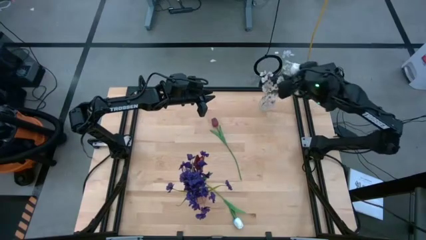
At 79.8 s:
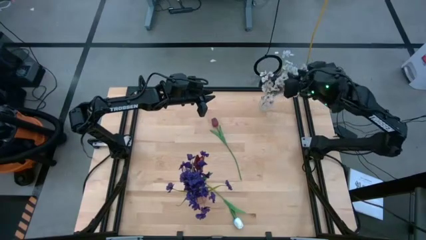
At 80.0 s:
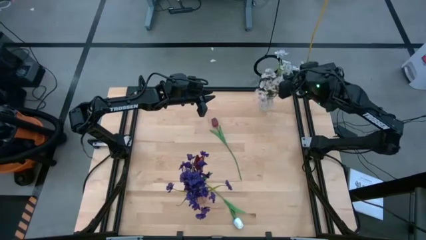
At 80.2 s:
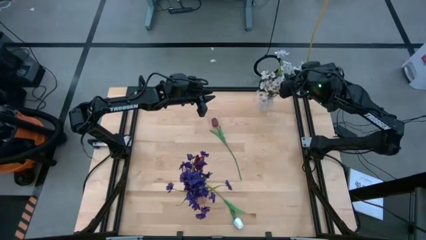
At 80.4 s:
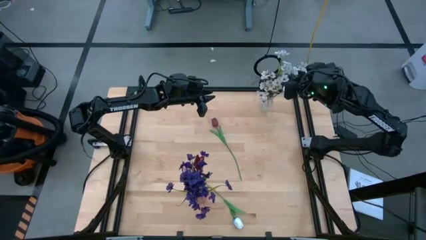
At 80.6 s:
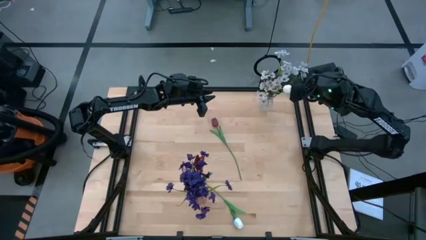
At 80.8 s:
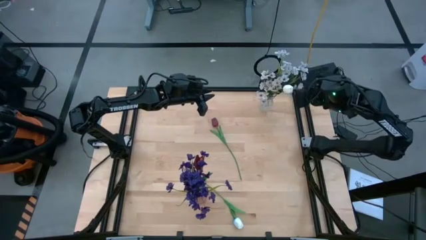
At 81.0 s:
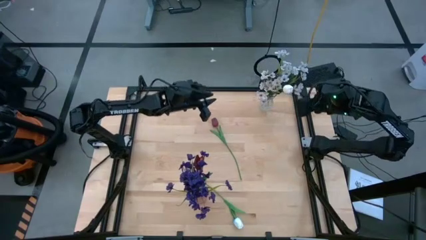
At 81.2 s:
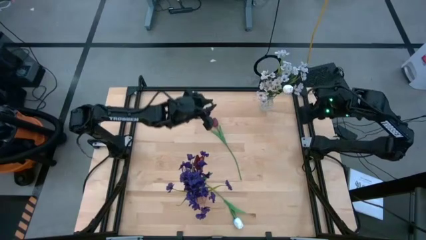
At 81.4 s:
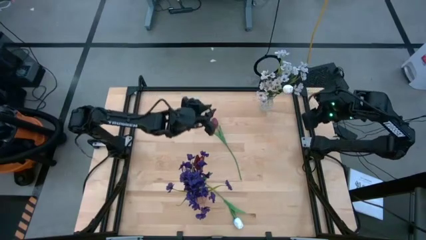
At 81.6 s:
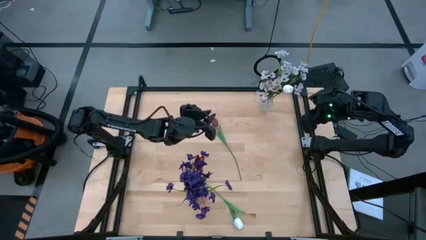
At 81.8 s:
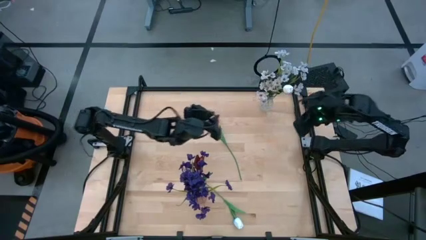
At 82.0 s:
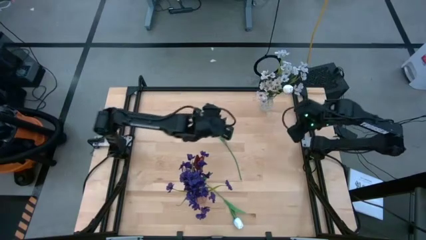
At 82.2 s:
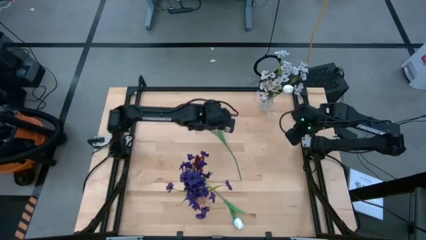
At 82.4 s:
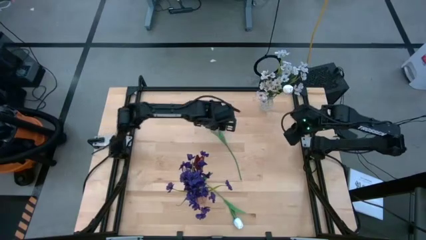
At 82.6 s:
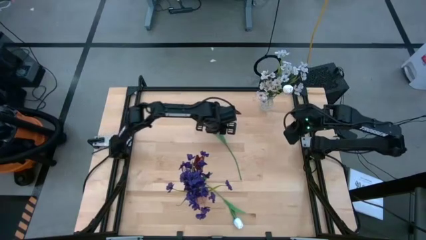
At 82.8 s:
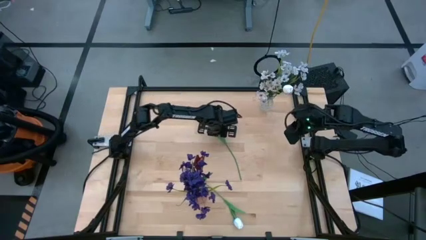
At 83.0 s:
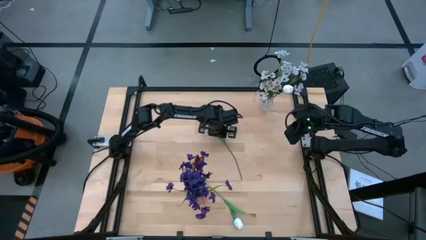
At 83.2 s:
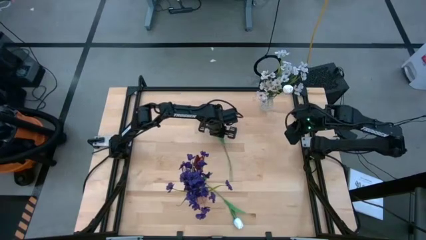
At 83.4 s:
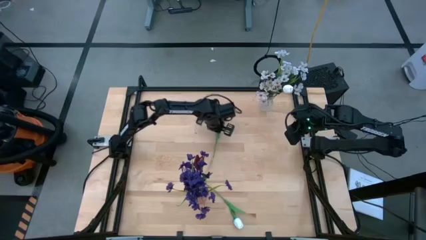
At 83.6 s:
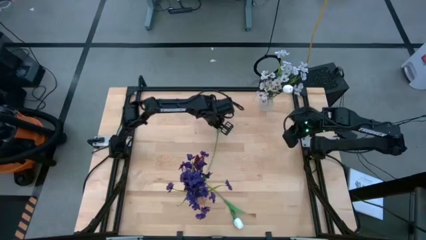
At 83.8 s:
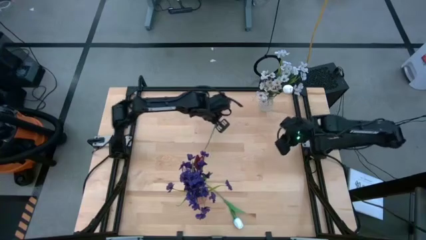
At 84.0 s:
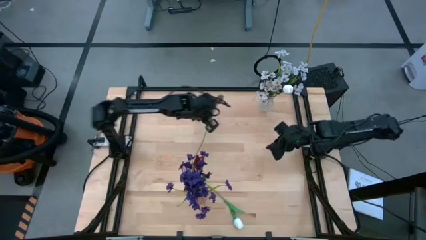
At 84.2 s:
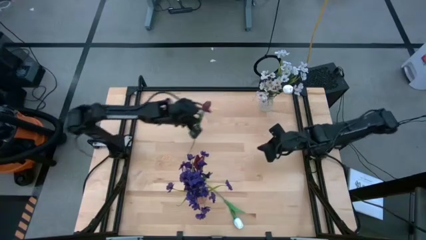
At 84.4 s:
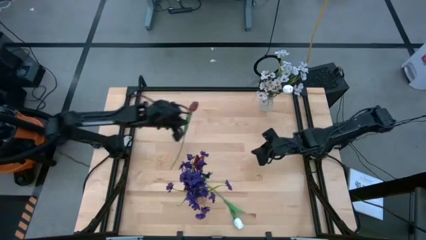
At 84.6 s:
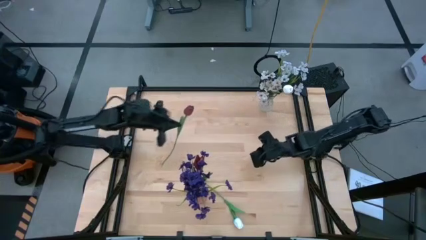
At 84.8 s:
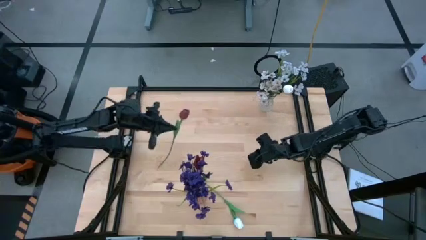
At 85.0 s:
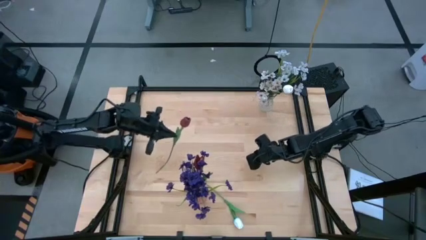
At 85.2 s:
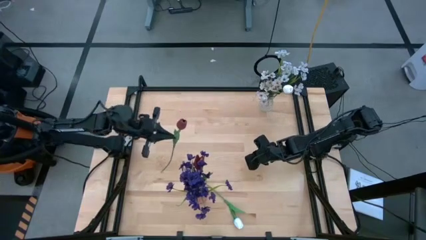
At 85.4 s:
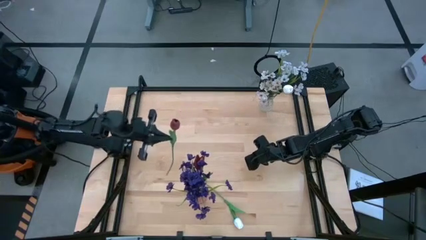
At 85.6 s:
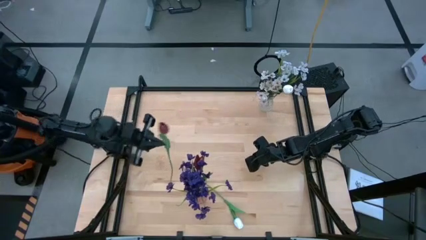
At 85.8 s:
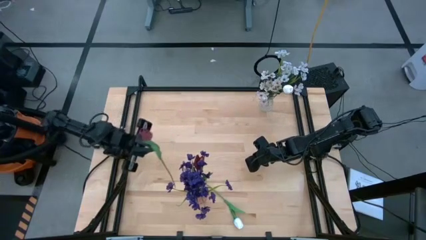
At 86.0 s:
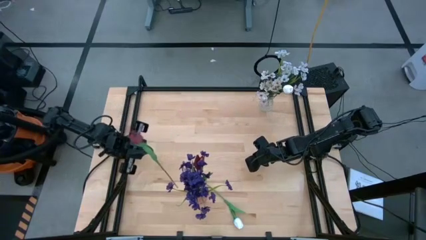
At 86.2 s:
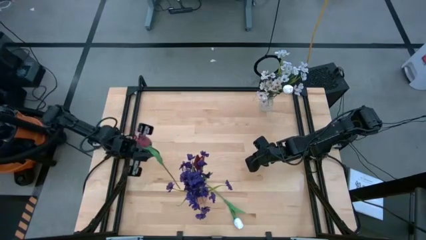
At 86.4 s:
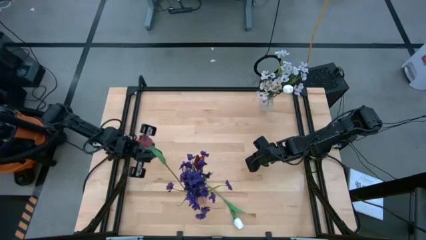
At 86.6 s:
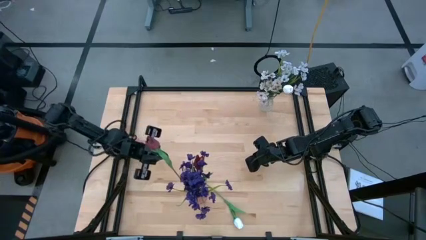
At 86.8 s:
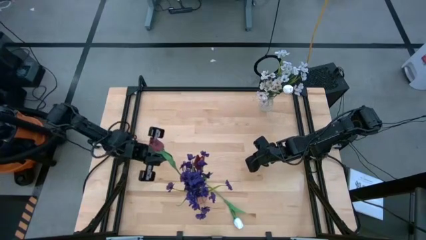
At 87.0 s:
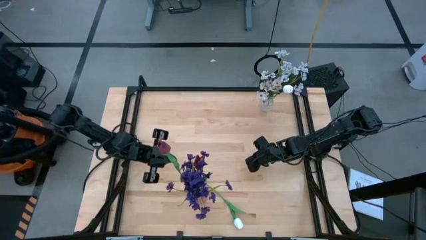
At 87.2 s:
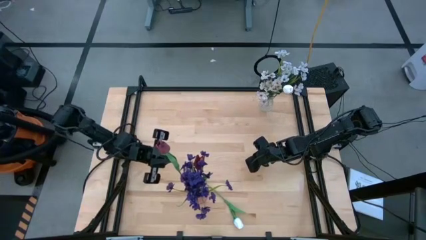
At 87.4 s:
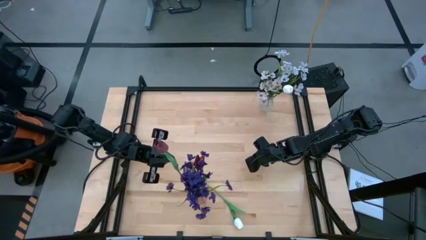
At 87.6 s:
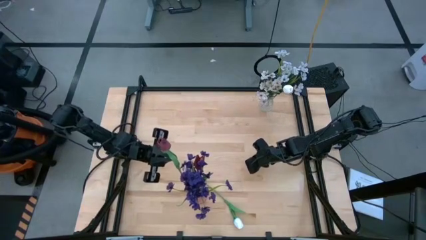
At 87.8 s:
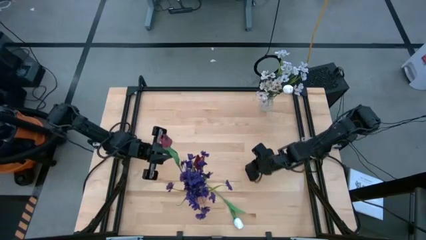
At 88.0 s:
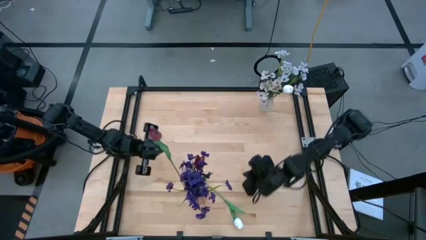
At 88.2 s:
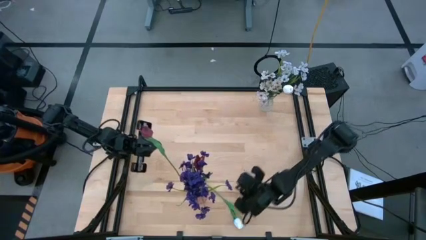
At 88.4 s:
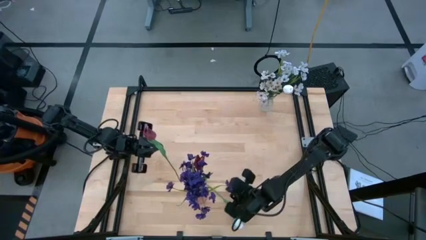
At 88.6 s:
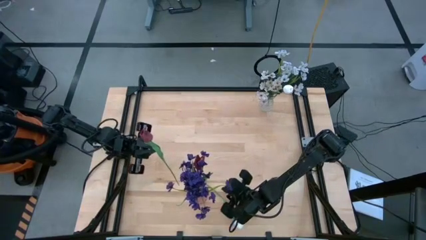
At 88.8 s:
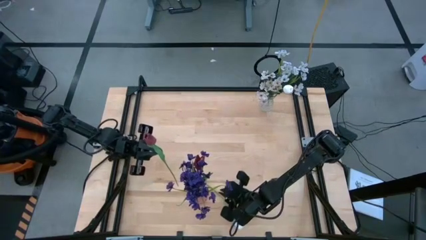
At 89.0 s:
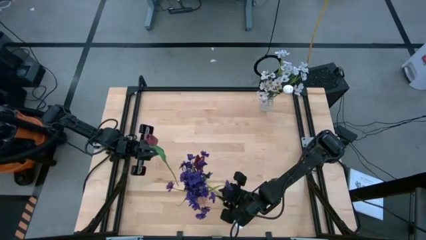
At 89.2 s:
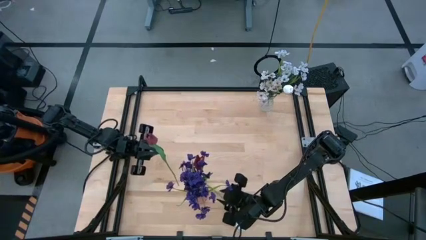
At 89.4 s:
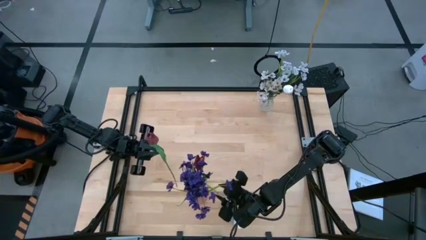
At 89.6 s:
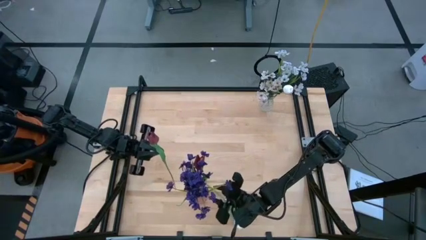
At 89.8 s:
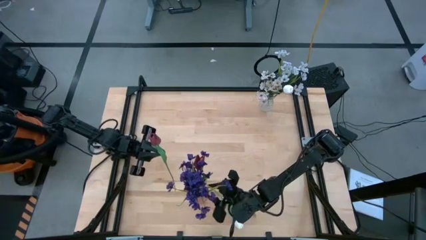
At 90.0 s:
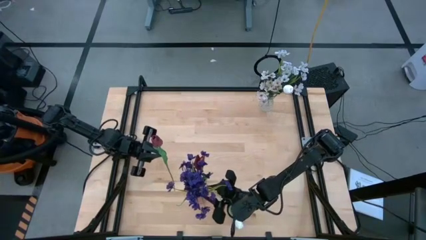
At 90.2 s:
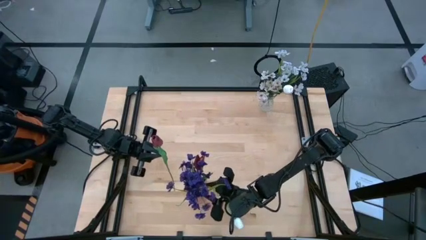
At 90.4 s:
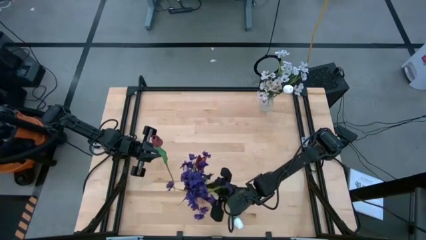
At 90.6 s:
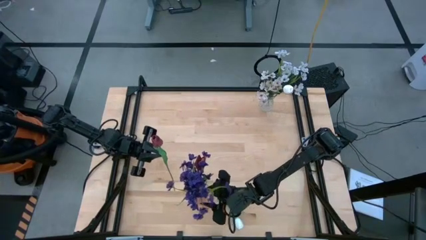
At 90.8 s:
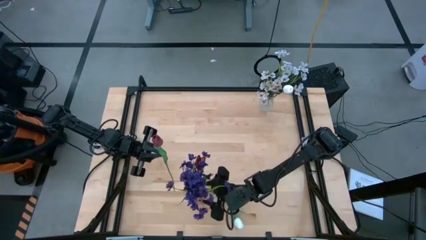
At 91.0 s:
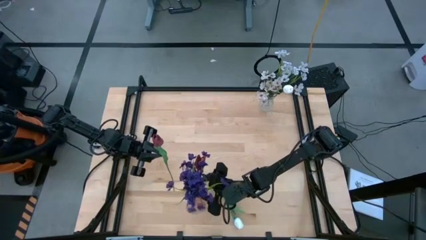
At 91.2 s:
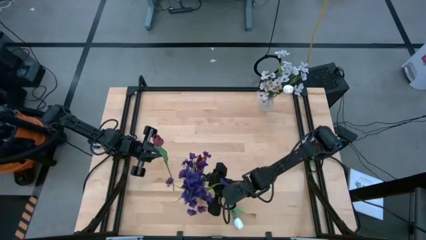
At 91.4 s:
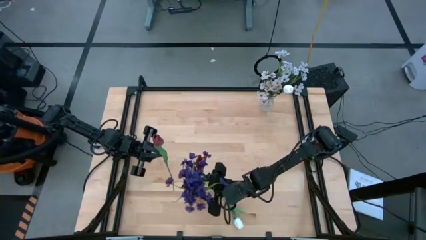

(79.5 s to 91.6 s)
Task: Sort flowers into vase by color
Put the red flower into the pink vase

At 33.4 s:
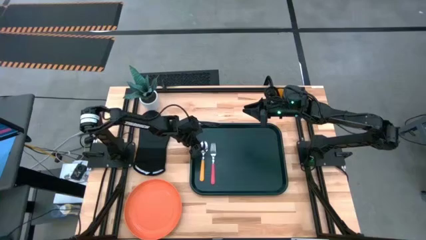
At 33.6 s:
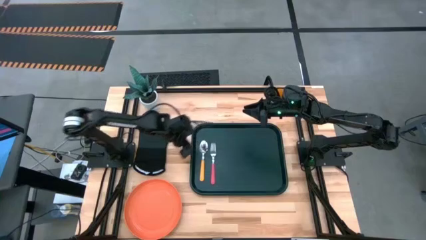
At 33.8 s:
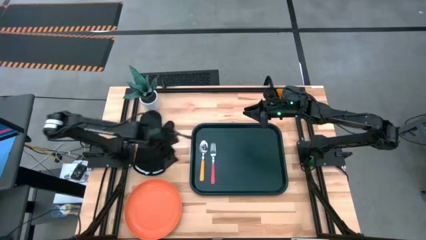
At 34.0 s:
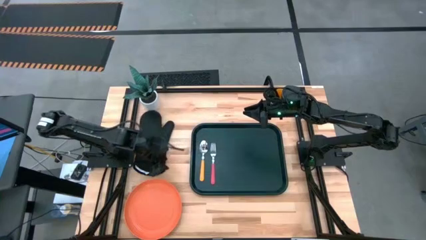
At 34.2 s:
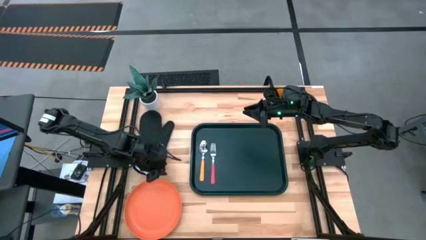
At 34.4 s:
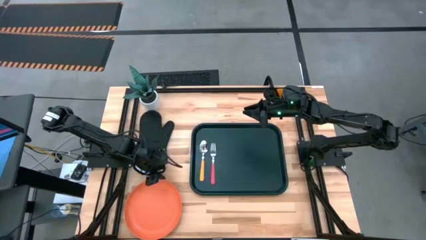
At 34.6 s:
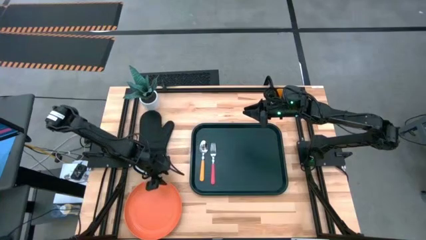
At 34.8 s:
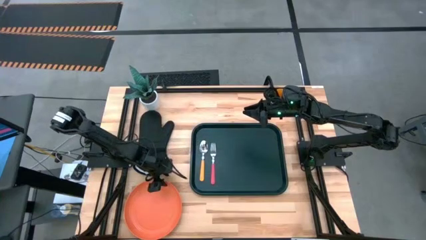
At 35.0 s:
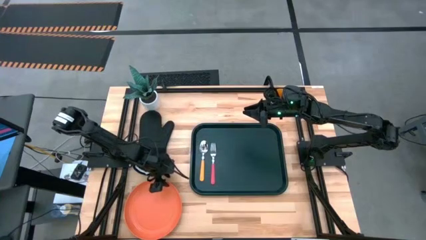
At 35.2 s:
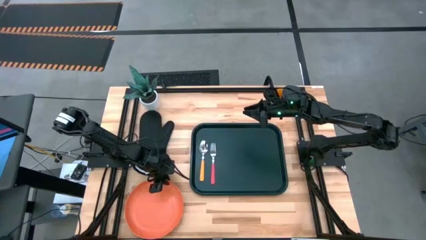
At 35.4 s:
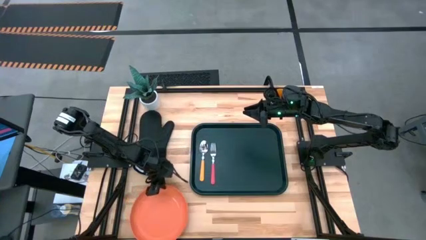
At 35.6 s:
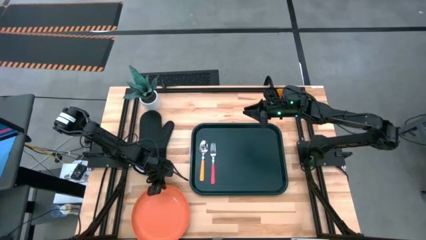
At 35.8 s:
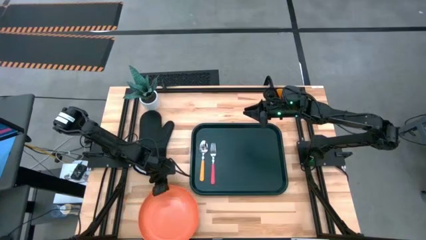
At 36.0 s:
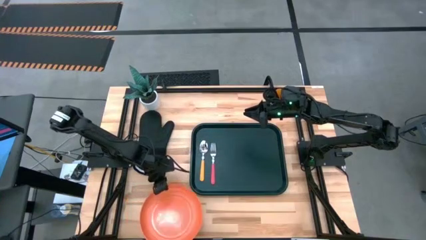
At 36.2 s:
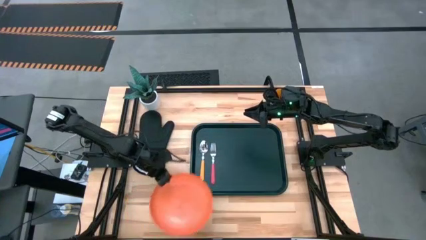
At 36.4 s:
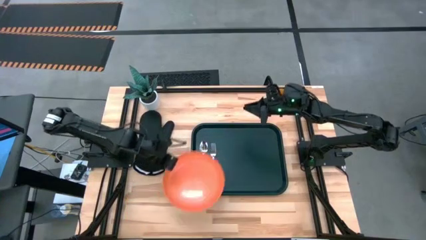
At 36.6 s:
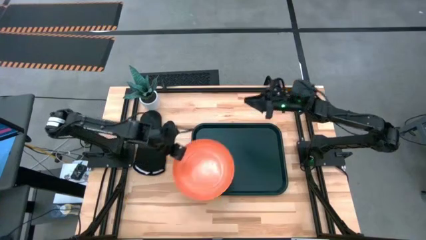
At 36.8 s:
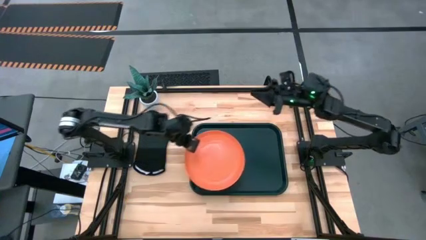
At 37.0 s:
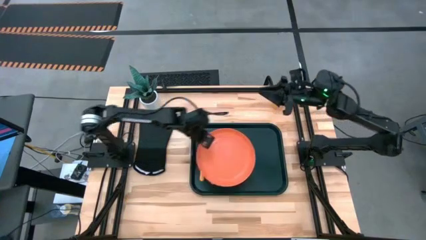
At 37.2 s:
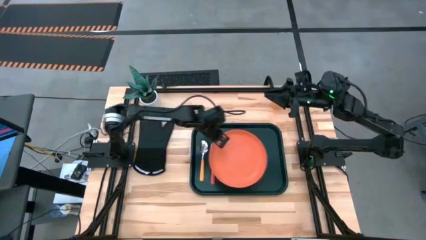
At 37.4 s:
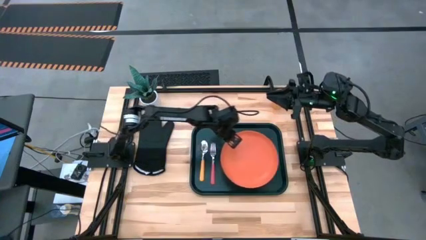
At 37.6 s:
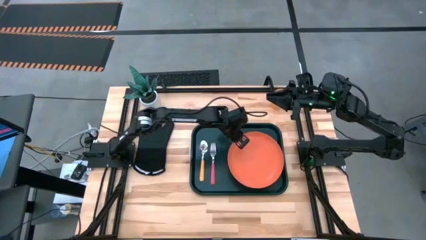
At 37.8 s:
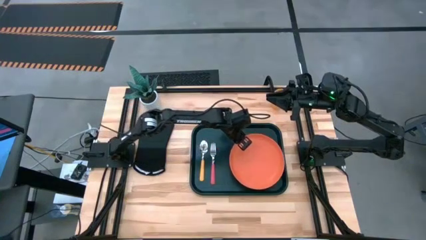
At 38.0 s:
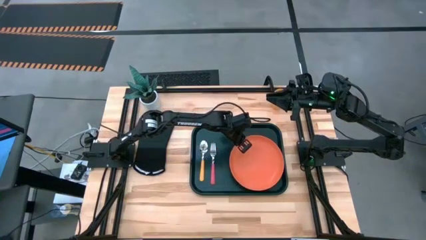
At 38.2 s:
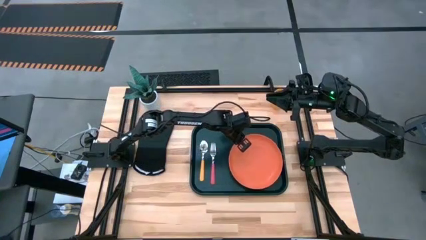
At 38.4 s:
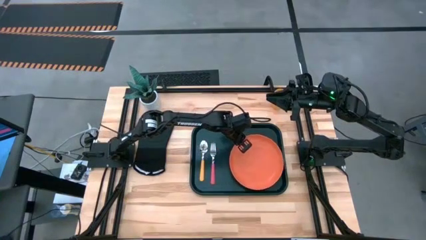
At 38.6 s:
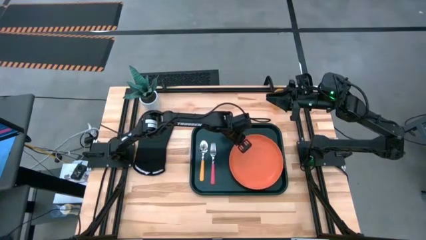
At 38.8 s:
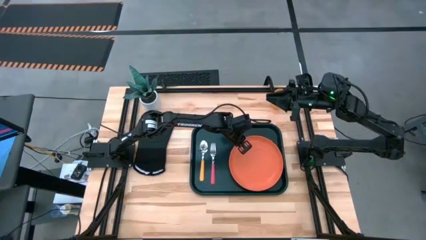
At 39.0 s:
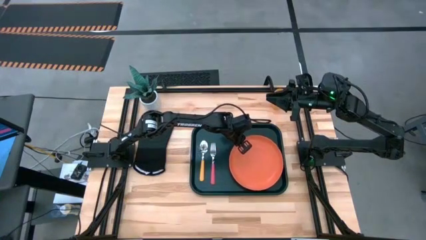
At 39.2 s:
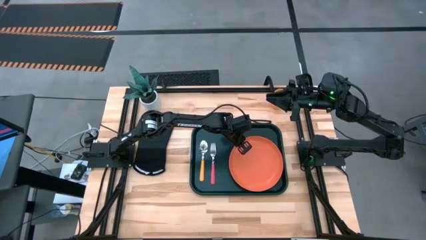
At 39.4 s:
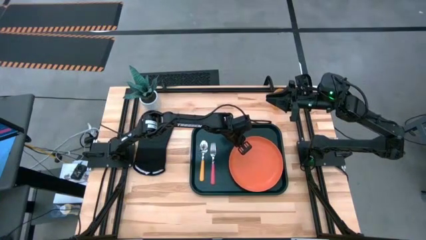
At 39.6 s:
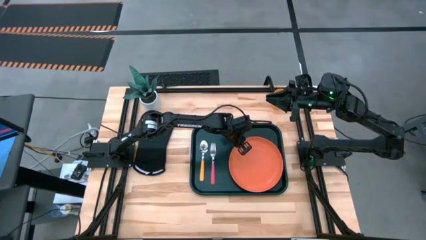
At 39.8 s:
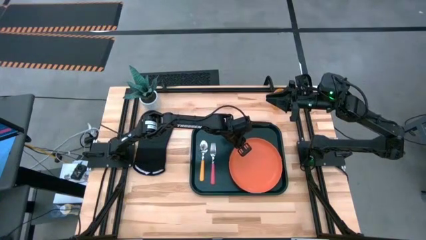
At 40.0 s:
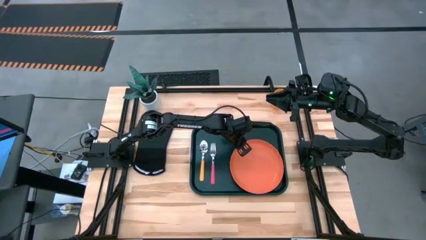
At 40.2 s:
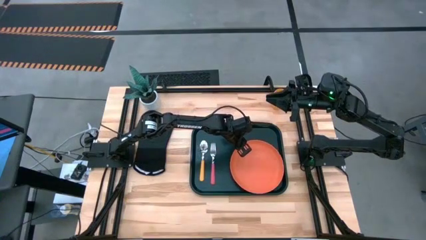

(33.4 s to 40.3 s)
Task: Pick and place plate/cup/fork/spoon on tray
Put the orange plate to the right of the pink fork on the black tray
